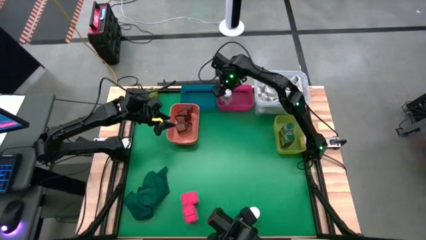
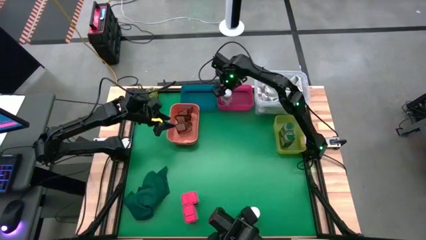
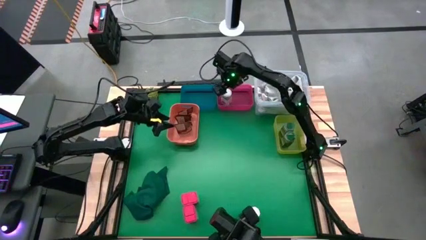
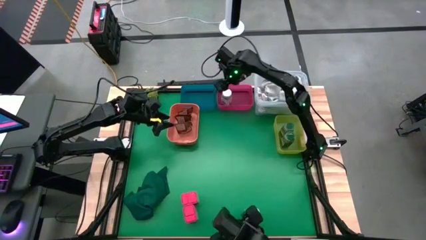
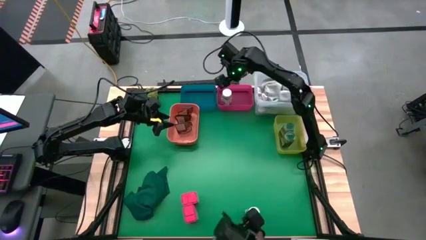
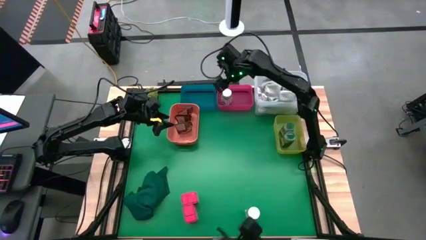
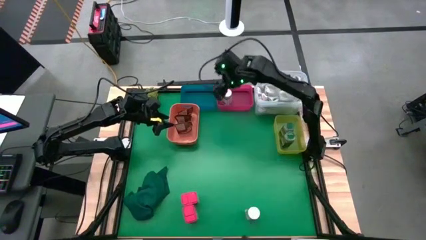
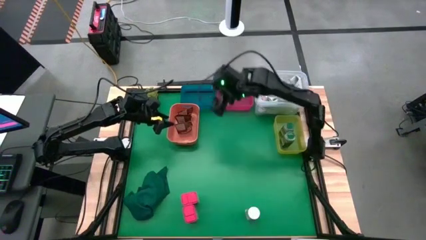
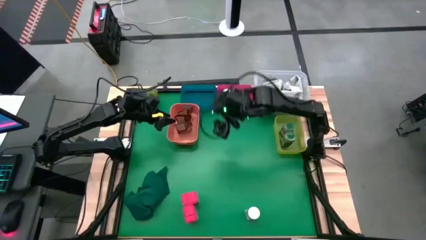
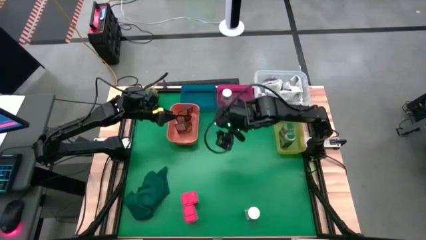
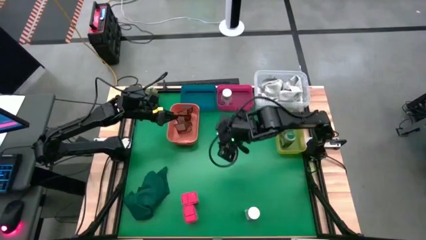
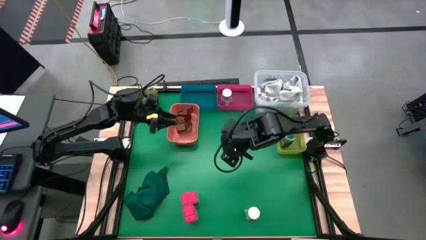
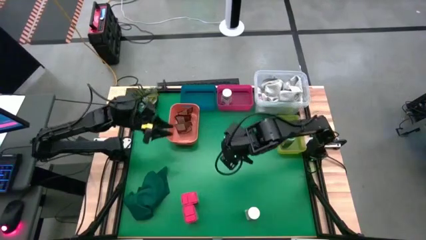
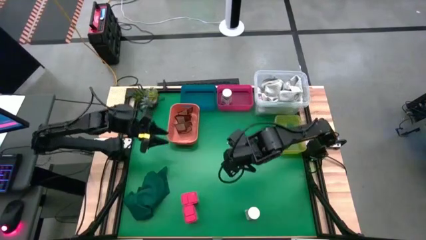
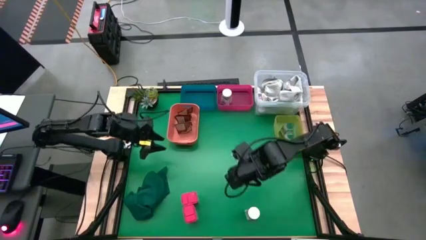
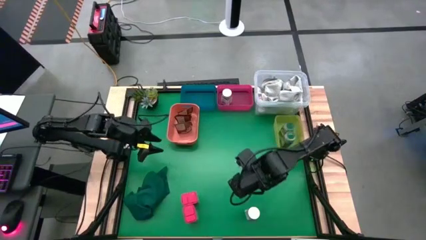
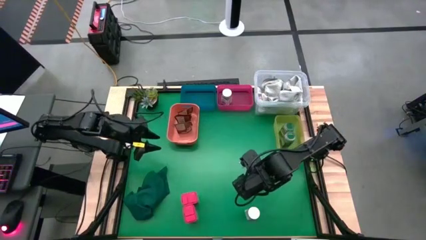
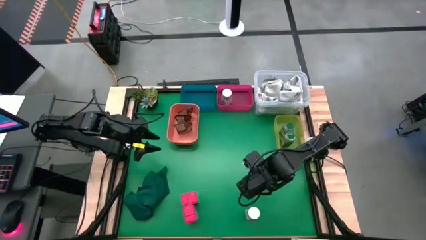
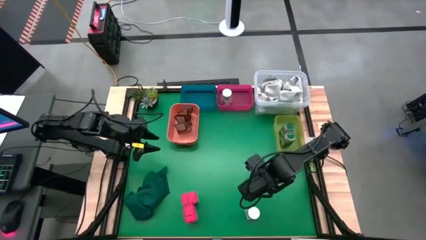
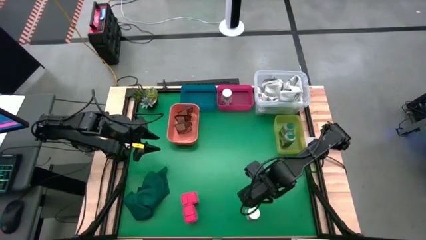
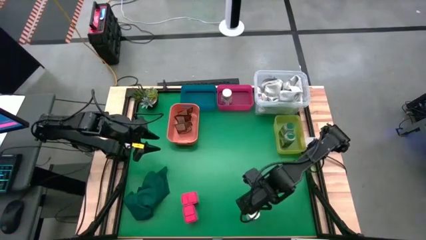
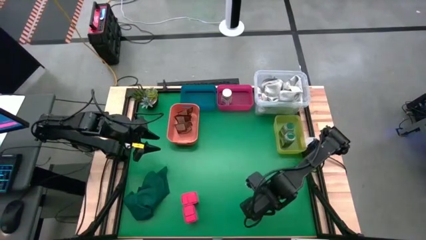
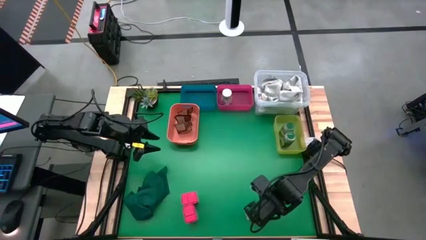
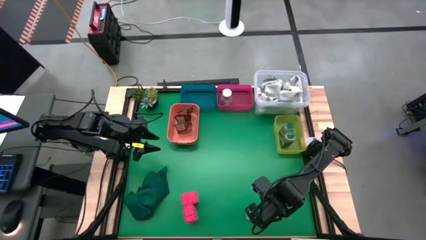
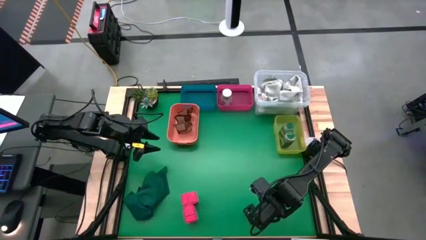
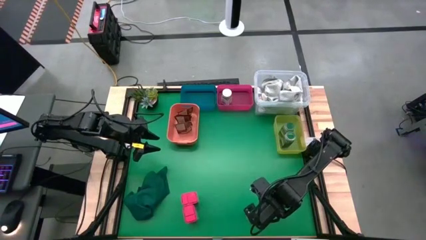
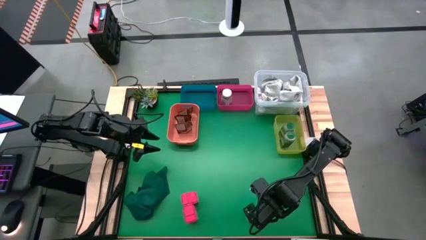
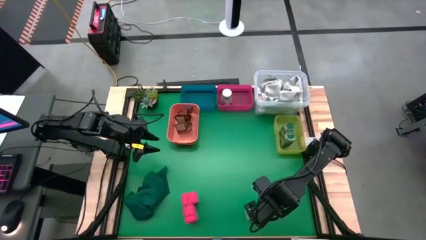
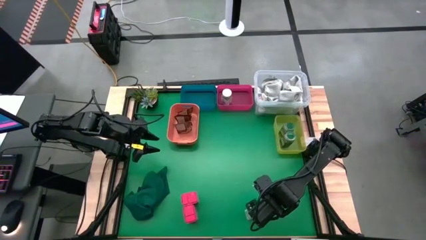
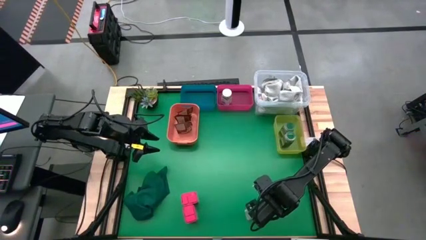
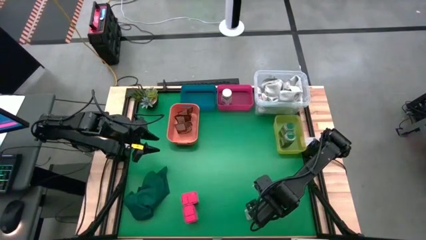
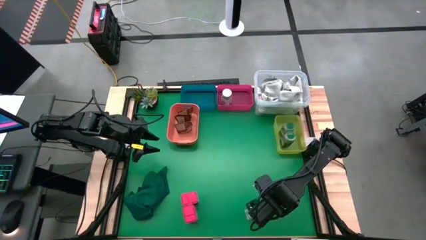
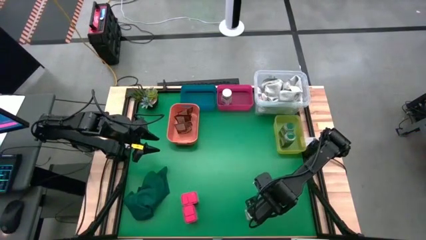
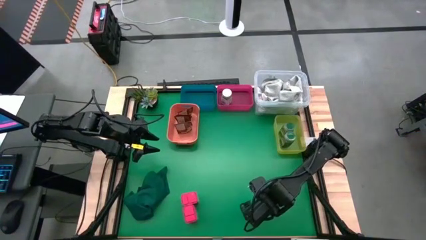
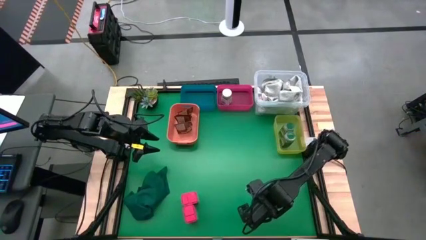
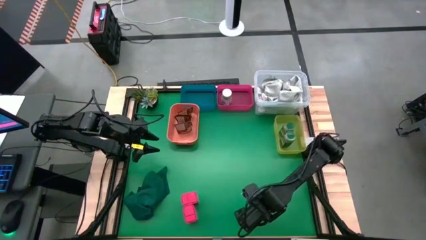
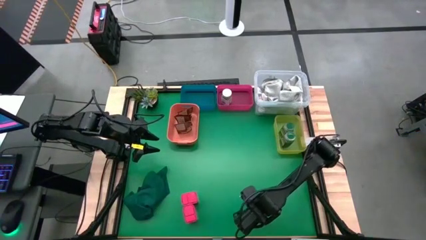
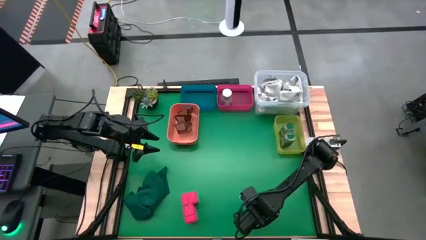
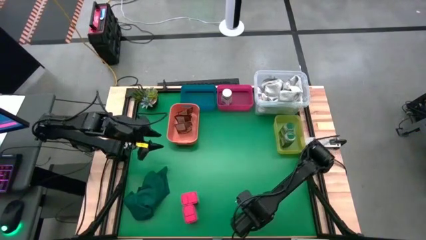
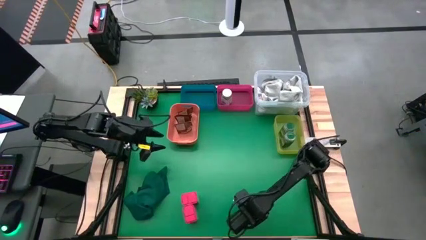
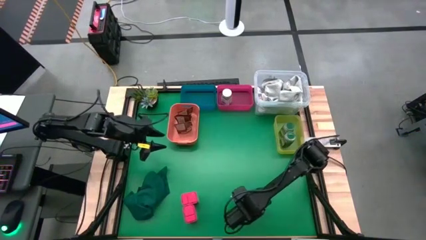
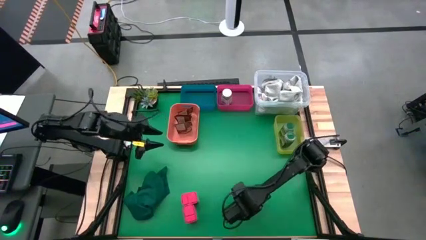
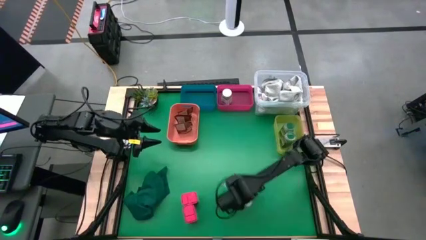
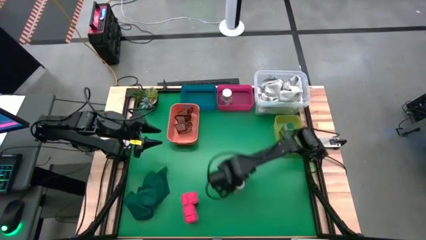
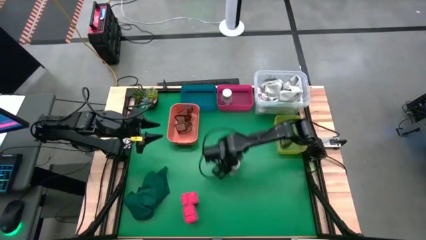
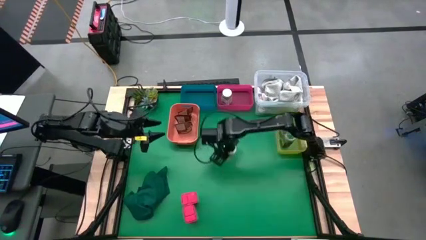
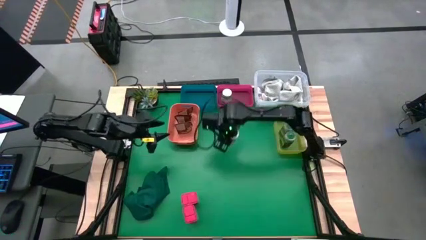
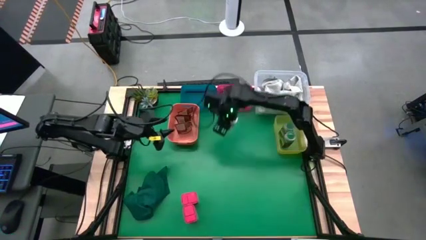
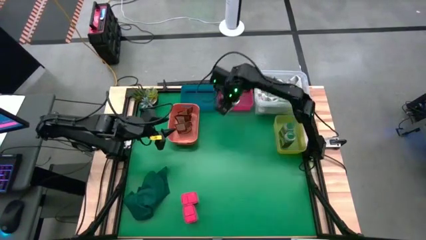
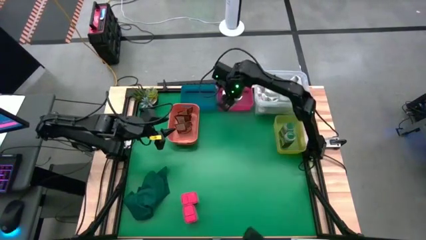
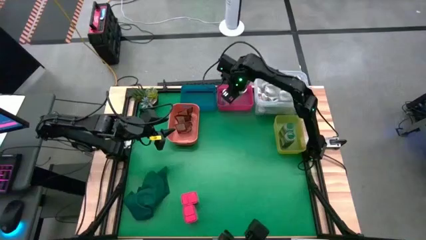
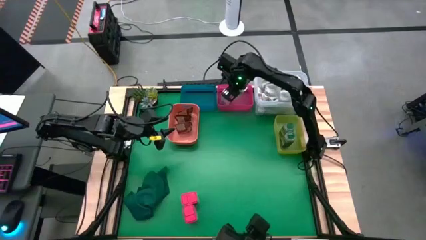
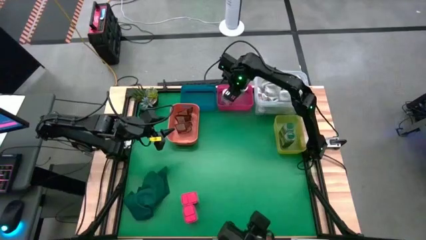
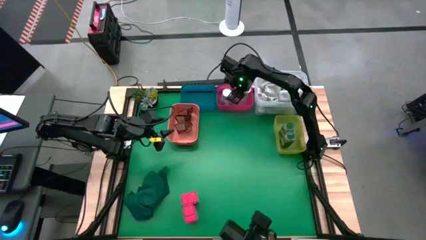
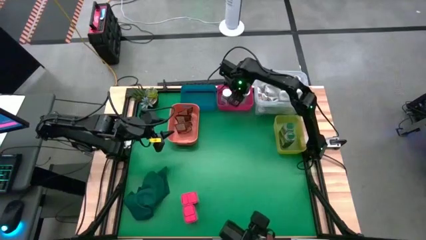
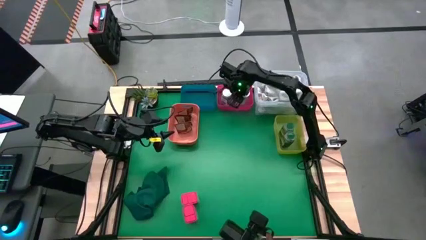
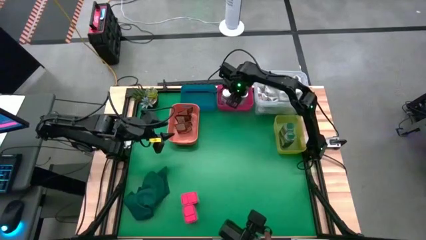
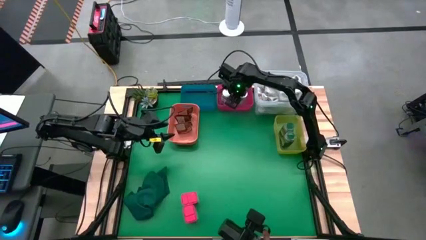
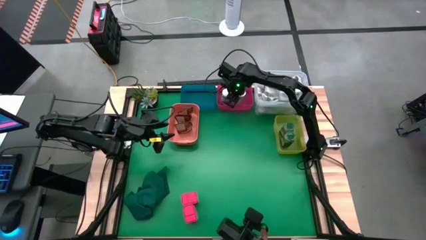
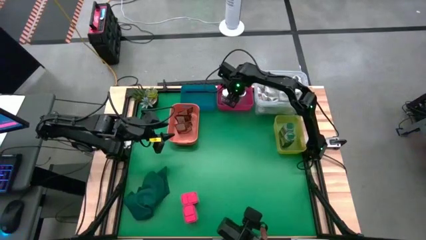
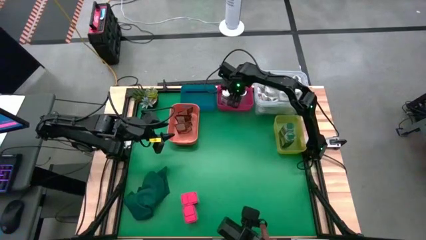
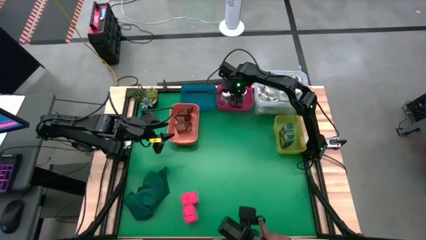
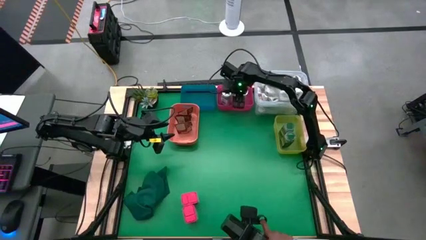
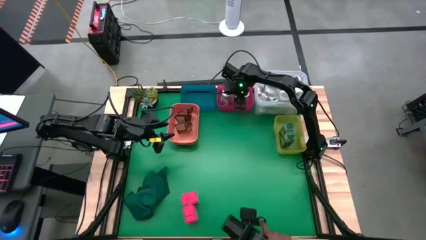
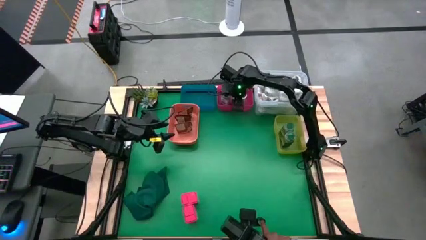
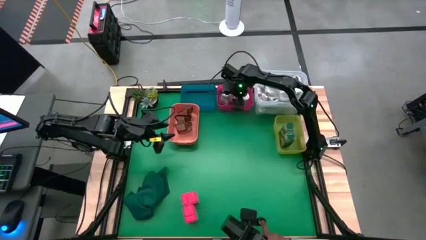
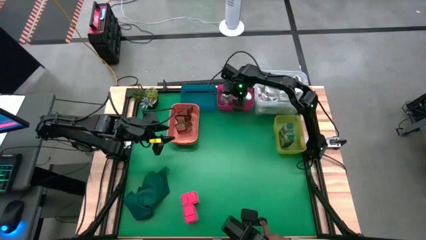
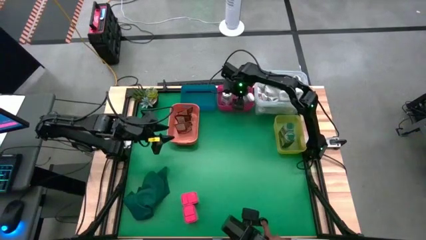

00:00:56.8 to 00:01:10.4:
Task: Sort spices by type
Put the white spice bottle into the red bin
